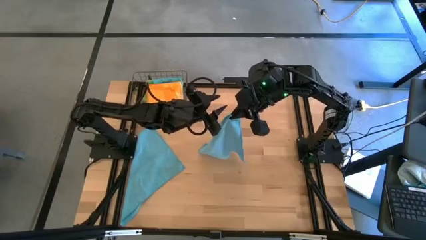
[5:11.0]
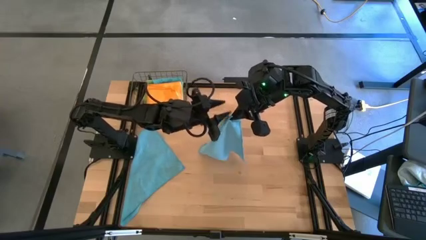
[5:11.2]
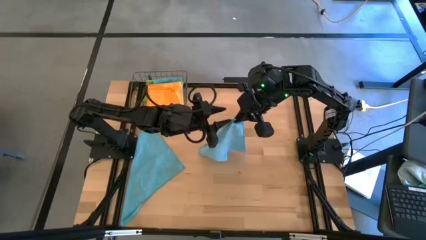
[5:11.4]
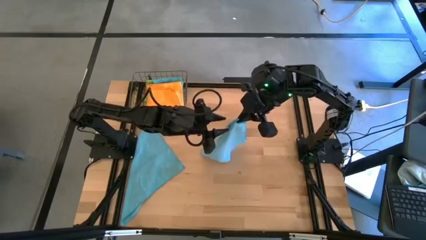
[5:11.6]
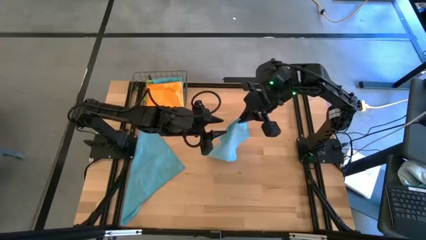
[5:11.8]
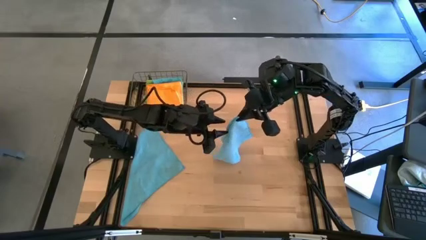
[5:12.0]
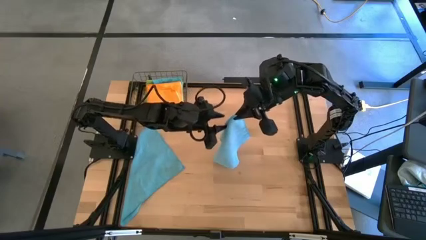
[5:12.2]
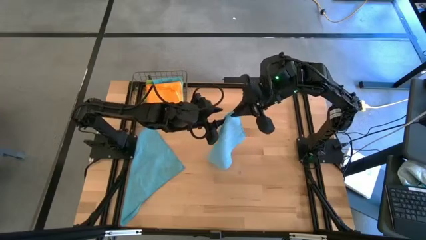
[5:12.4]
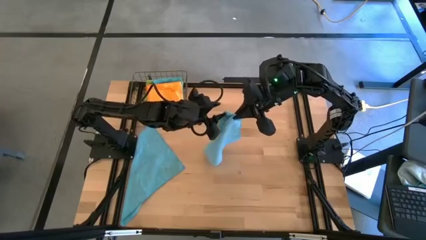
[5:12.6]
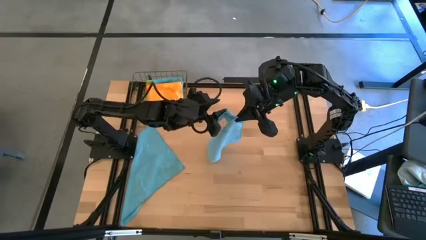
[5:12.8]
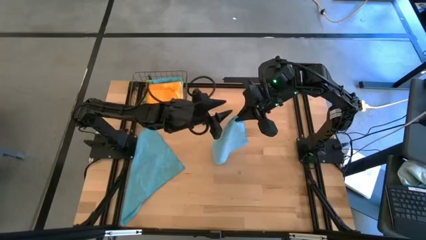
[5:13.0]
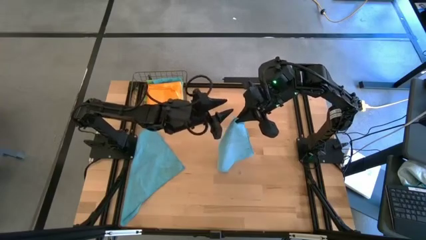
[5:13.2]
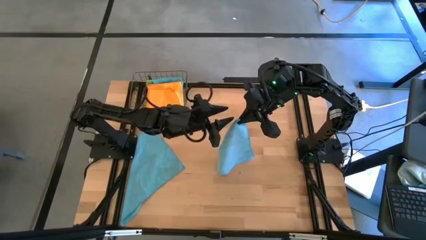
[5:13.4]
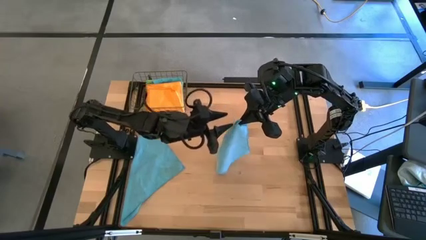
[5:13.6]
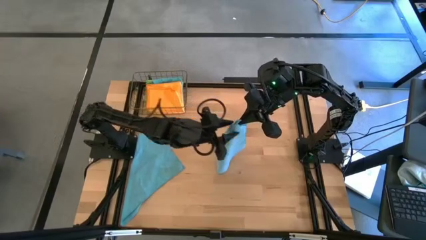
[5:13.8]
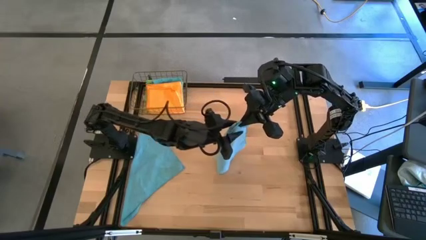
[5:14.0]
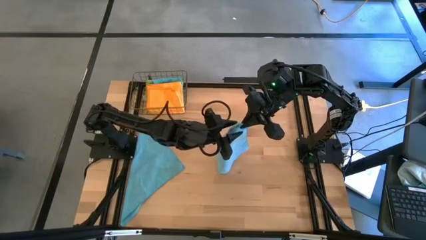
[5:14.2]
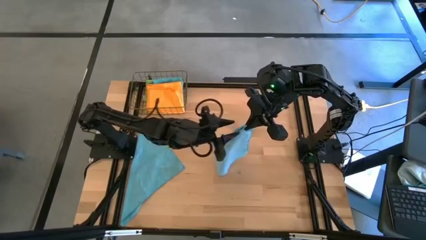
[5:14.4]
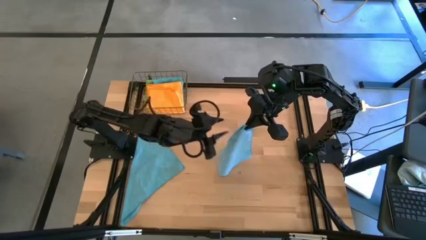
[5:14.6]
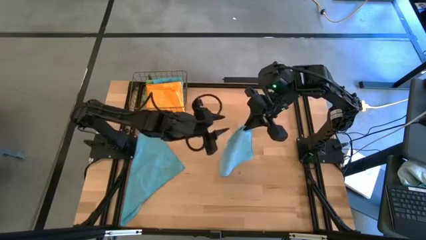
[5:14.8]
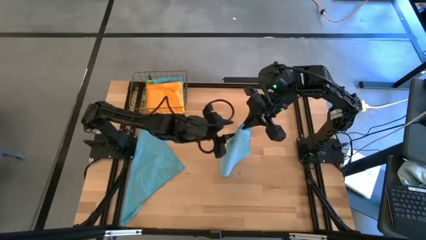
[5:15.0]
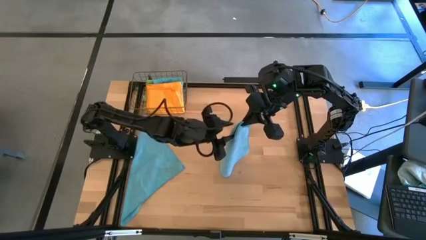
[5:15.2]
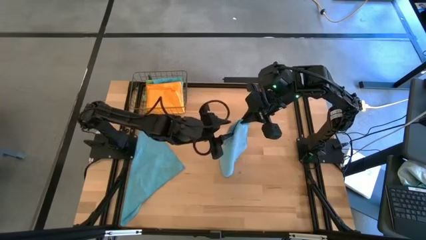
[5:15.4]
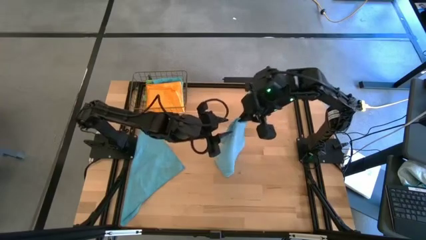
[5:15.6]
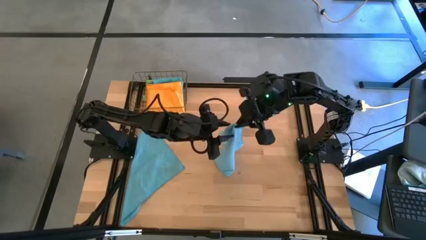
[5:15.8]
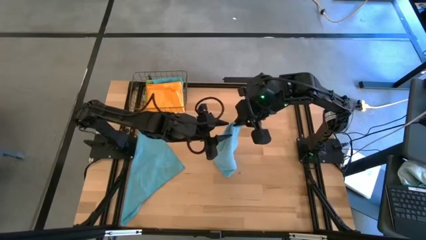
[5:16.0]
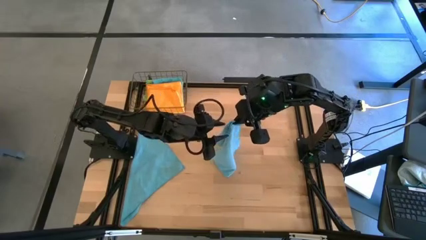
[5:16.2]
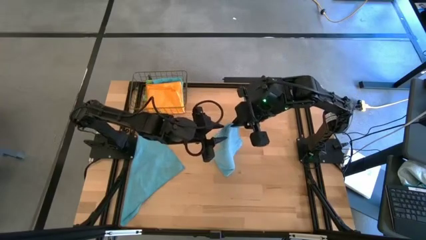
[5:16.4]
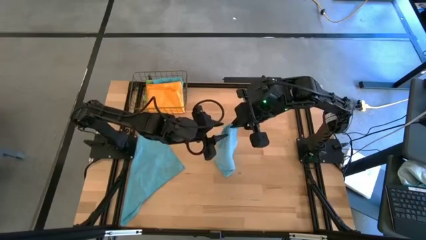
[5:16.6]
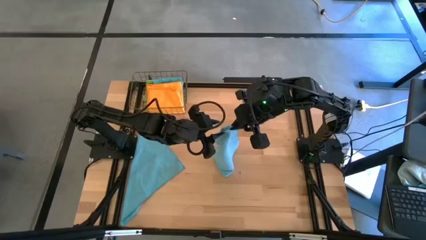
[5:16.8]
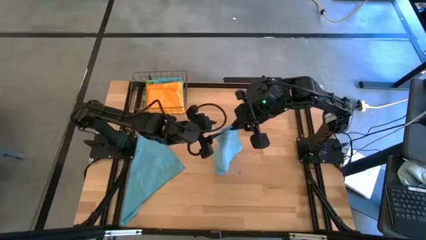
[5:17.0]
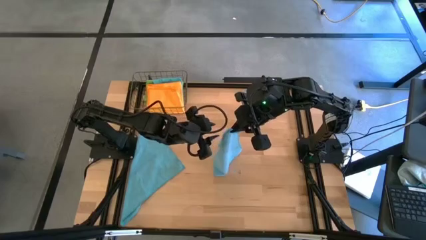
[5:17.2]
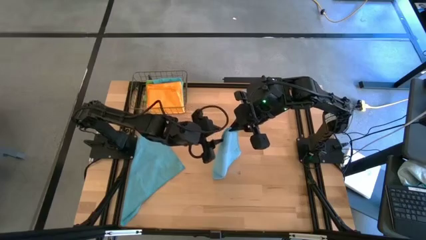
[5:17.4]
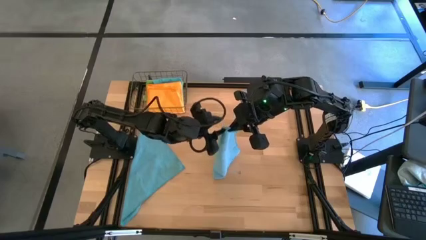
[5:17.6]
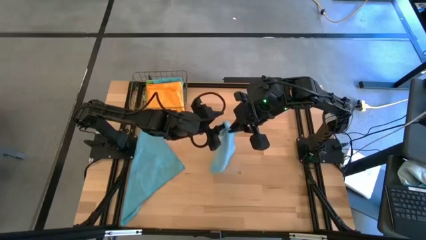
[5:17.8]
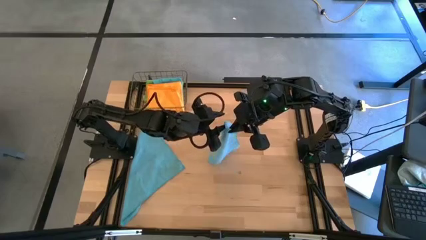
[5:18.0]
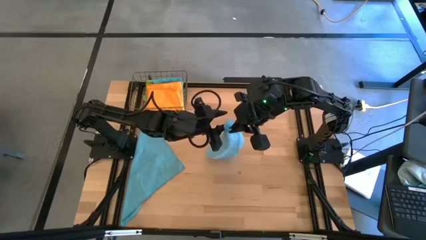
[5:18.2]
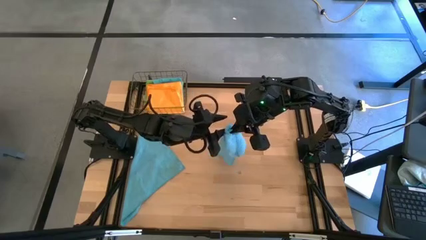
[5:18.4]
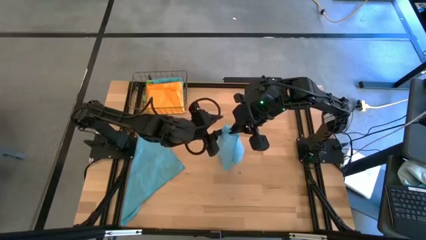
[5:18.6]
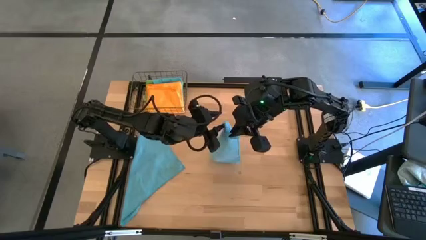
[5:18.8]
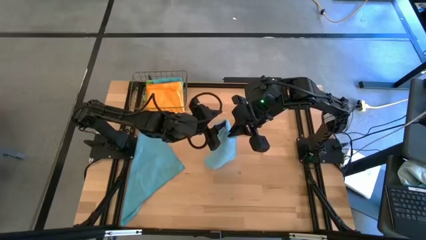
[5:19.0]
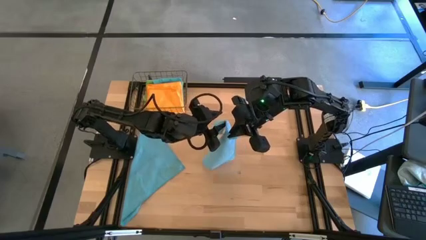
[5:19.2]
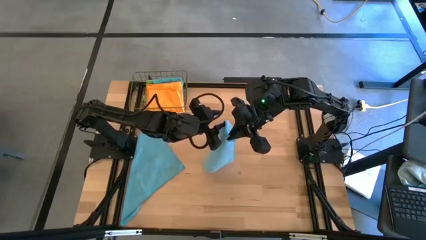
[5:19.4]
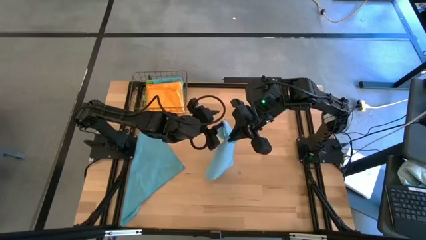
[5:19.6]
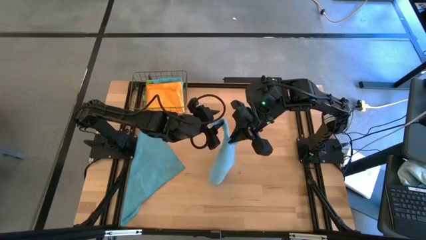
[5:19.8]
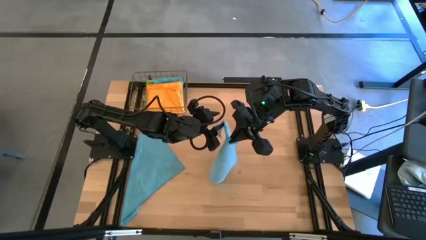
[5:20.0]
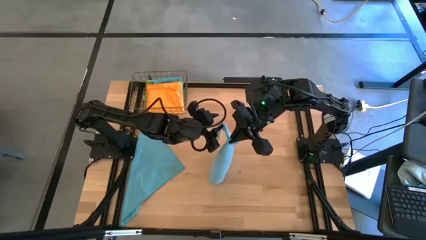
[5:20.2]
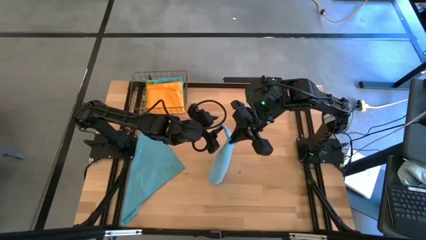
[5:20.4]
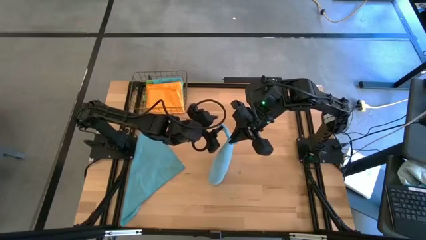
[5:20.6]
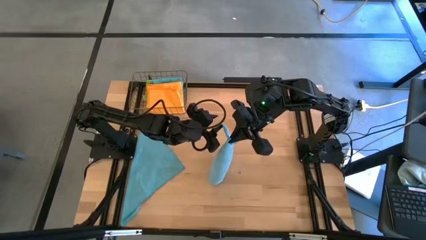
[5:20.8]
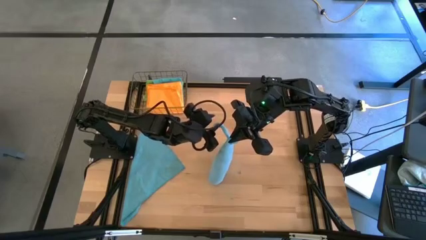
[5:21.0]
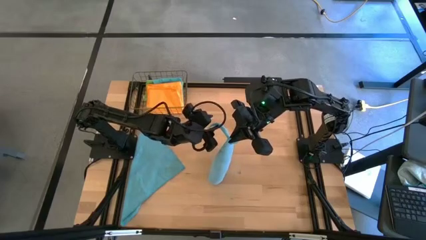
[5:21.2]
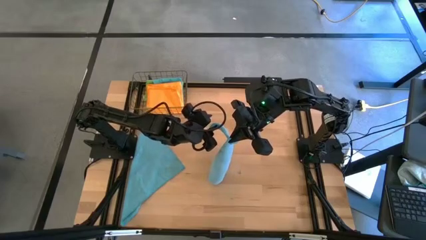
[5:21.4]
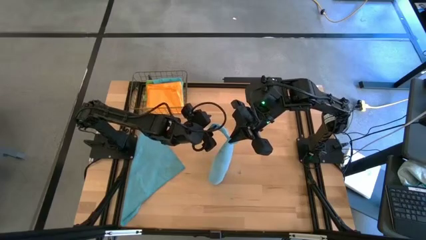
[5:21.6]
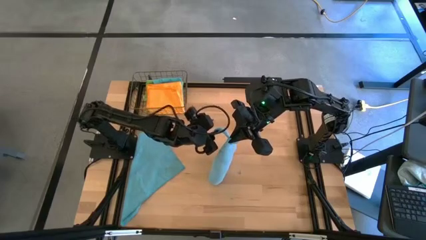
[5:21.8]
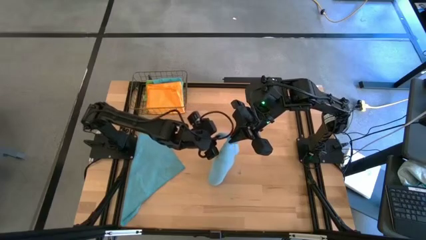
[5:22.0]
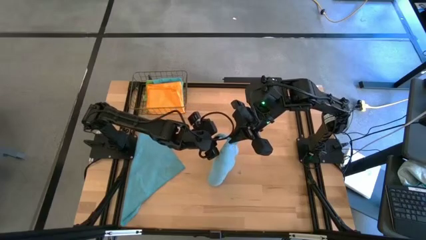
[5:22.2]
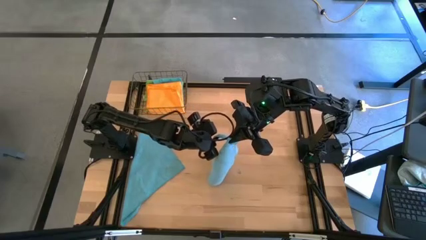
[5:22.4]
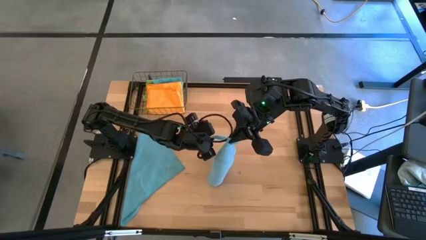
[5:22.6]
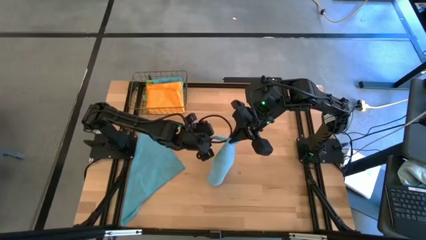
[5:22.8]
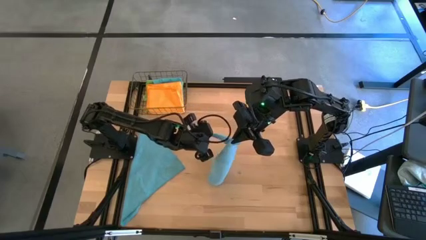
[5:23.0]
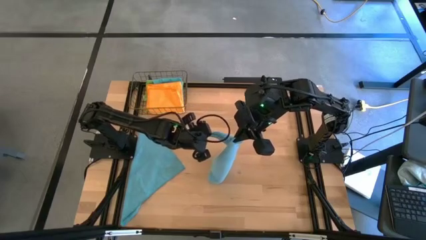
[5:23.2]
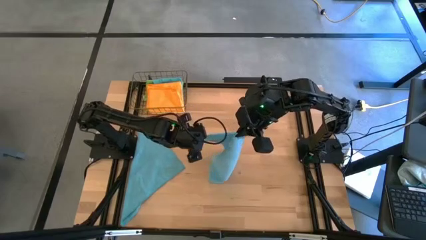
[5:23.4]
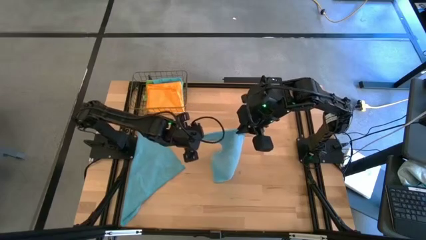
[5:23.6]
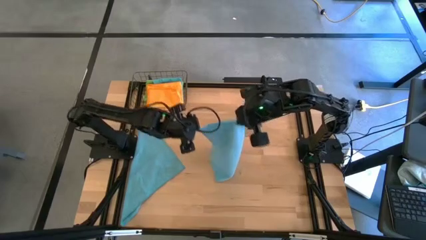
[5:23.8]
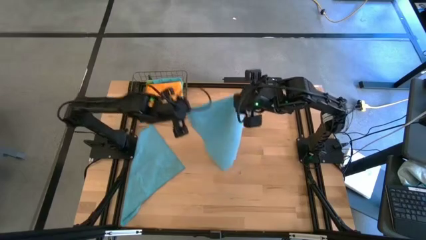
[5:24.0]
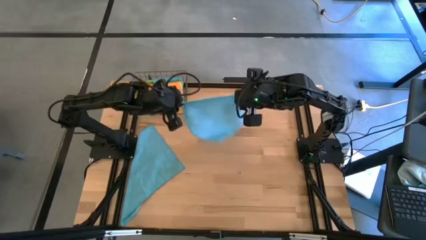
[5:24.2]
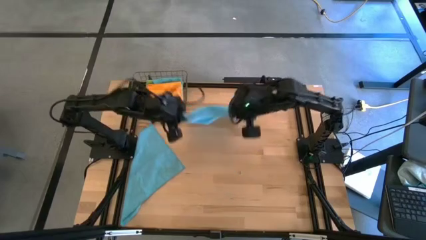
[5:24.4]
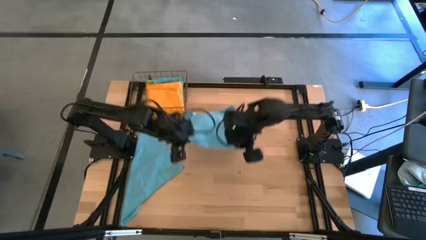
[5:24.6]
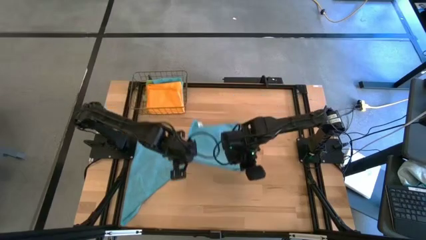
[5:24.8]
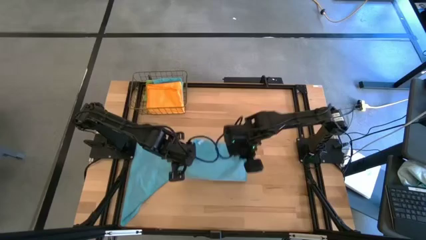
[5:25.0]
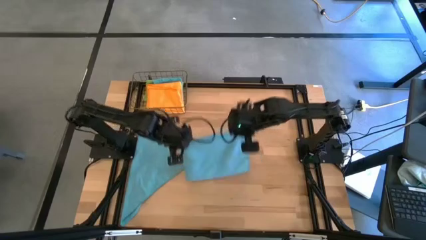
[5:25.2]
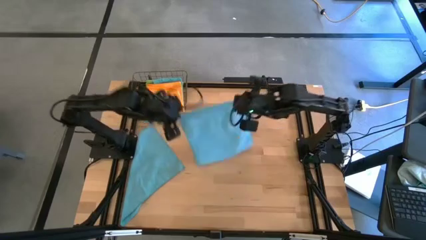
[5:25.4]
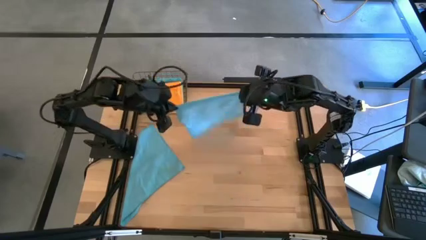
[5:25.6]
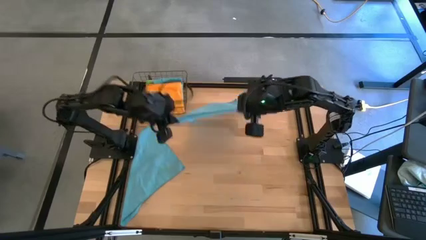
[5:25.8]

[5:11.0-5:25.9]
Task: Fold microfiber towels
Fold the right light blue microfiber cloth
